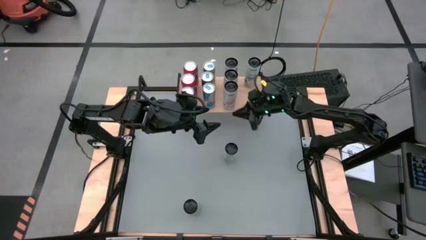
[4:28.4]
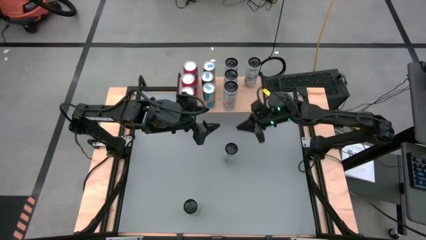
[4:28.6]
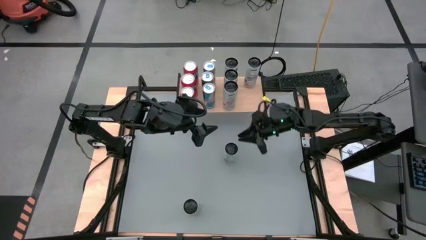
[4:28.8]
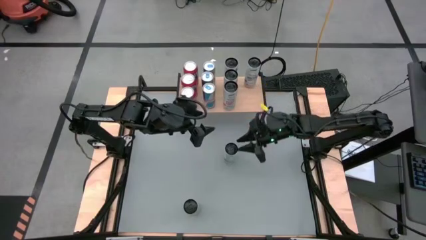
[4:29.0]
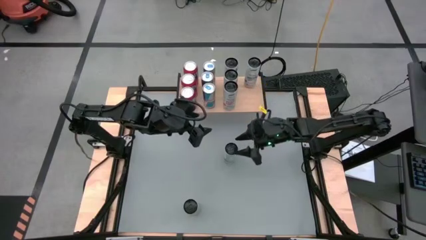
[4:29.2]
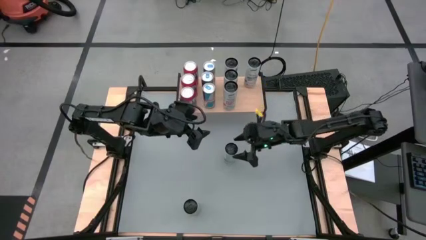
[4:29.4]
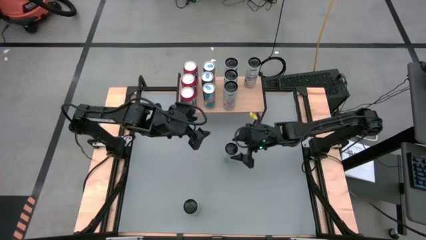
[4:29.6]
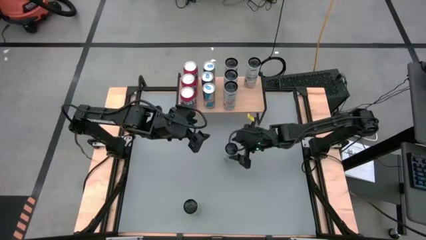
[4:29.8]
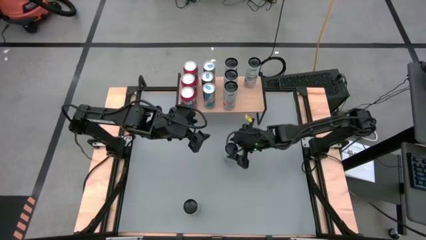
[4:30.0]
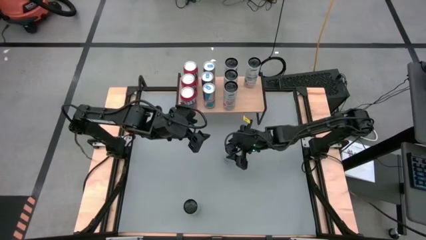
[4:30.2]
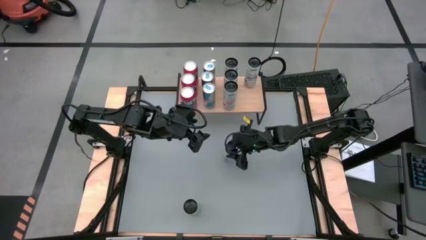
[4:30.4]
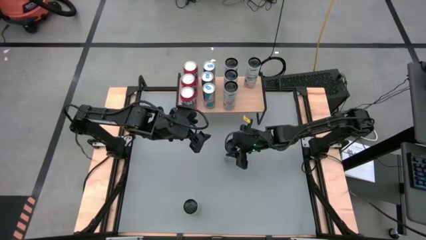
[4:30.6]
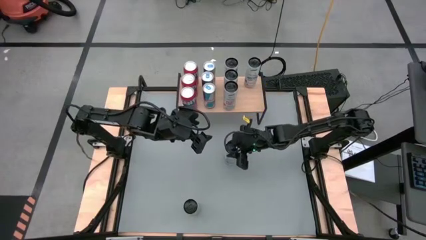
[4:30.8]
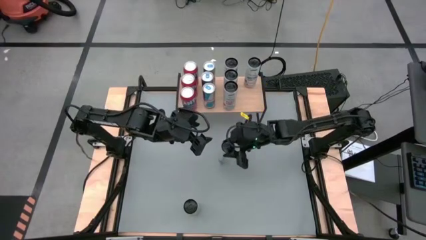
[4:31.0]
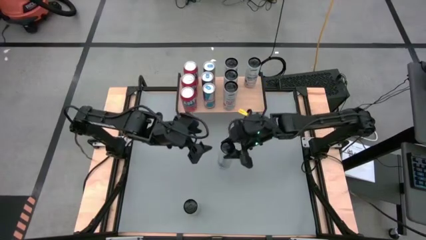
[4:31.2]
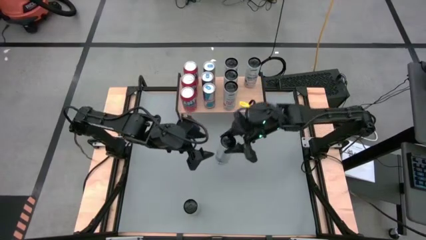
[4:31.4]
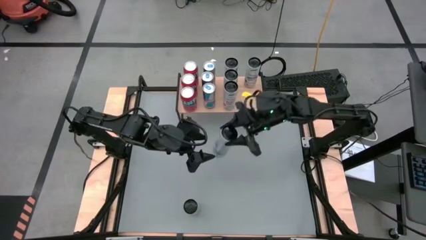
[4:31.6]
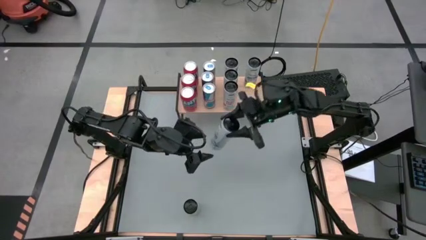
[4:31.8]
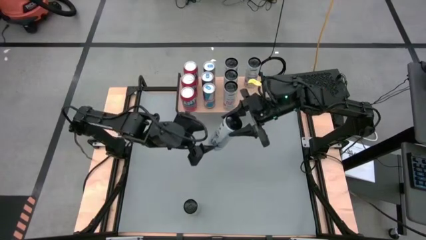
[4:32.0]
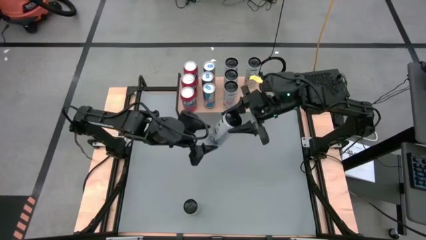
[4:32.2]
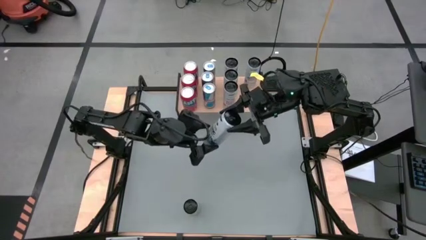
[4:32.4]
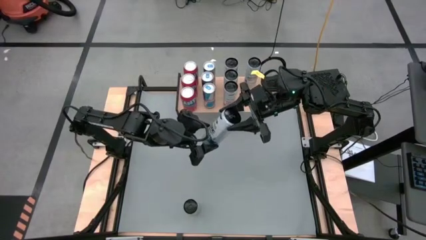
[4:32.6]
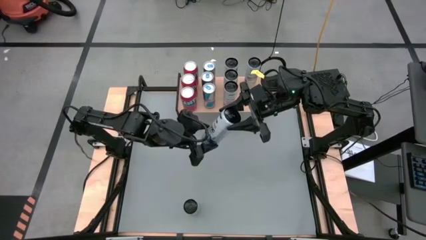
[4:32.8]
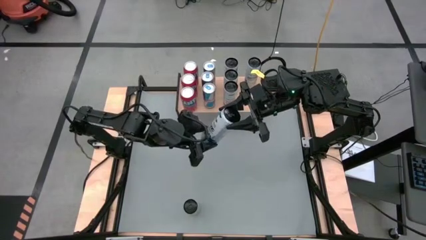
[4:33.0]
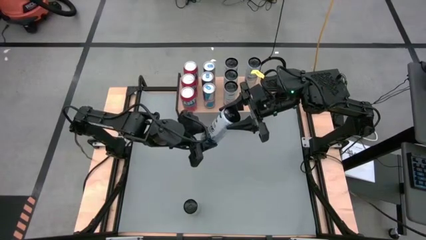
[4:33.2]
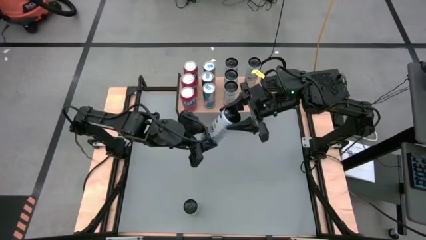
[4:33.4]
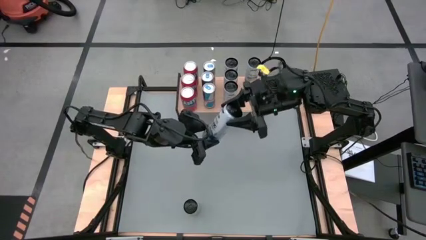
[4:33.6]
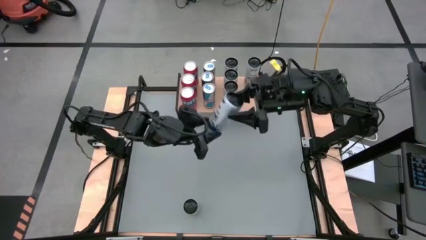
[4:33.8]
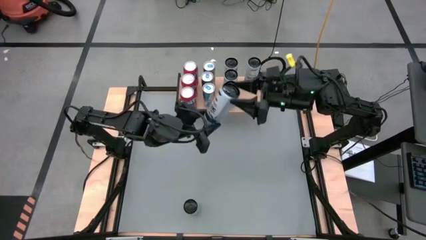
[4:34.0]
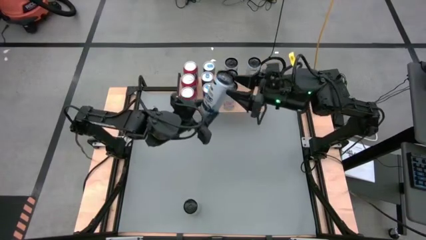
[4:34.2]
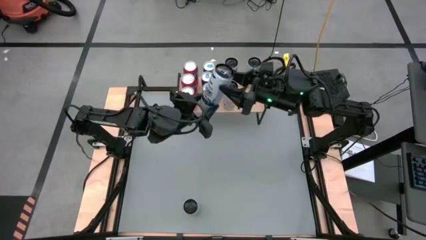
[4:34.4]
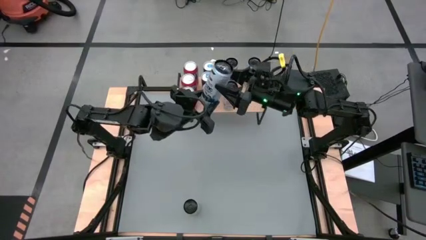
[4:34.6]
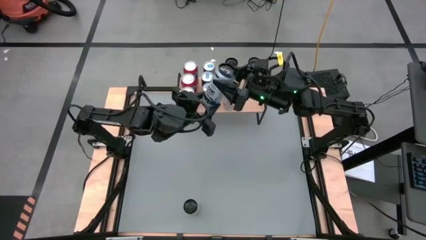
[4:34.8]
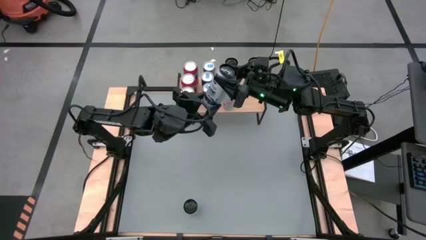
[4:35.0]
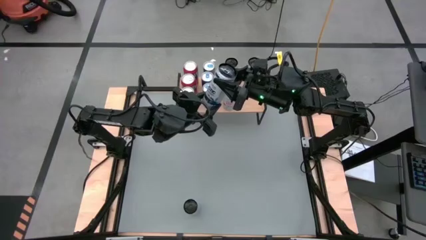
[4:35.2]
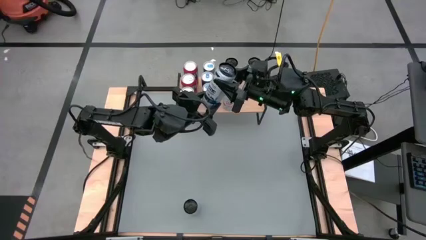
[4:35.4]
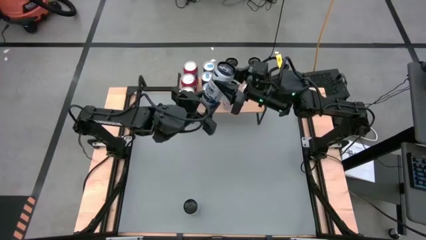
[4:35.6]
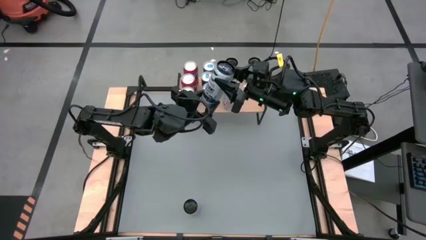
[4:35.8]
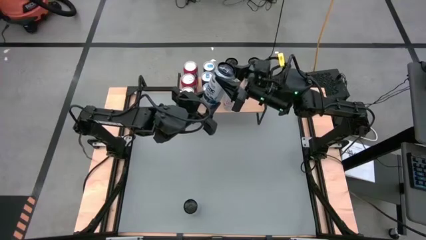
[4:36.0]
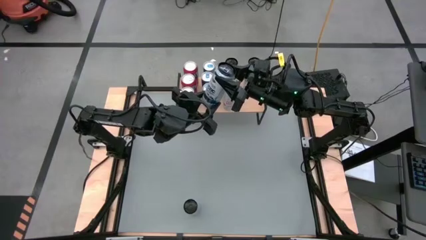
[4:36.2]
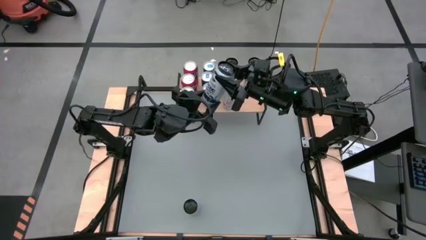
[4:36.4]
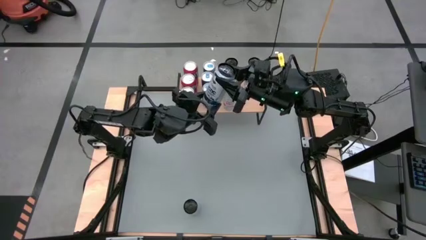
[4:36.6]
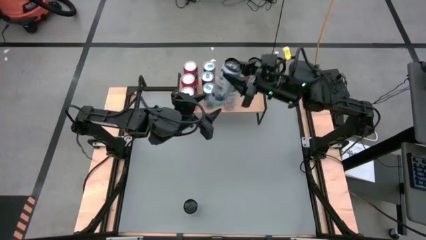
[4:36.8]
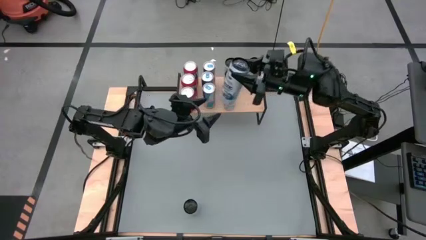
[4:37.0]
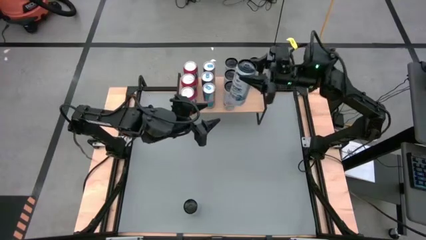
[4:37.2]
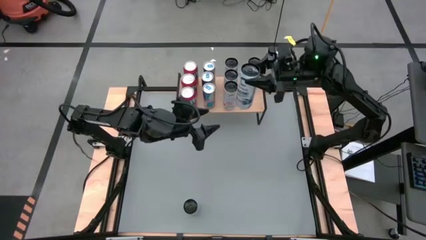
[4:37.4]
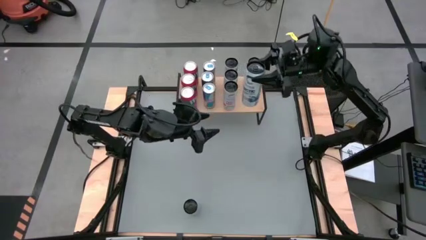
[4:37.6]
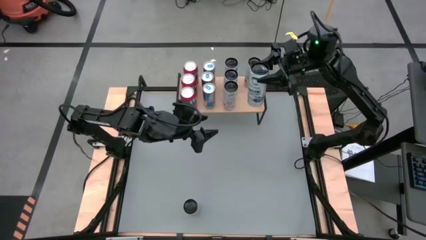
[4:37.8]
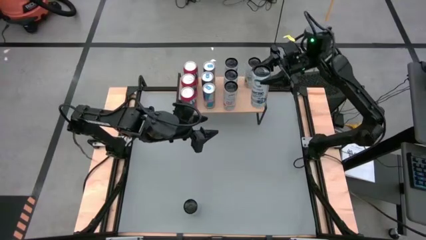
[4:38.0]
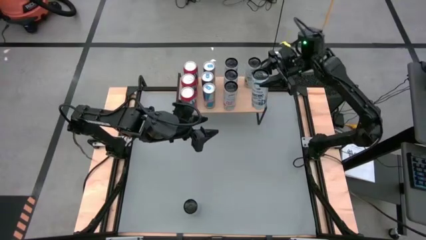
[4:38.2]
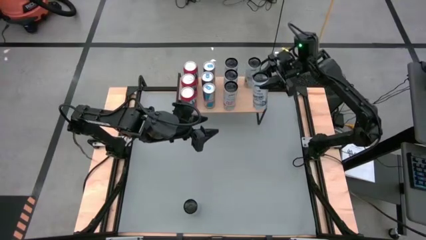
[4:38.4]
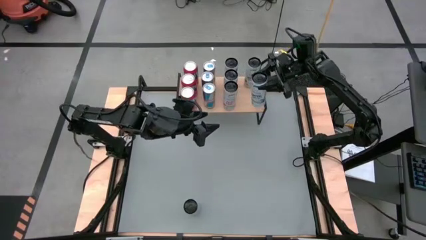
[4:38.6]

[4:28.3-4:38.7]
Task: Place canned beverage on shelf
Put the top white-blue soda can on the shelf aligned with the other white-blue soda can

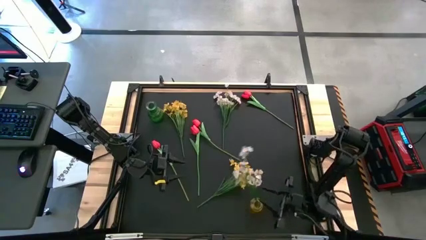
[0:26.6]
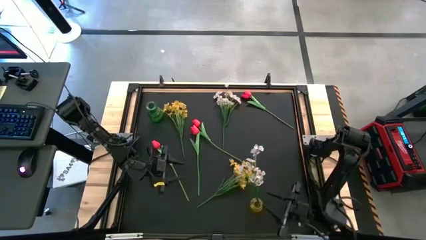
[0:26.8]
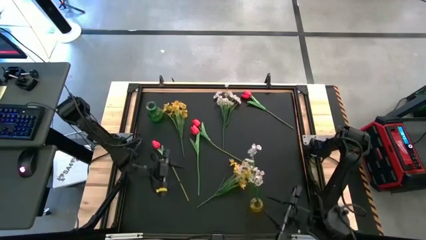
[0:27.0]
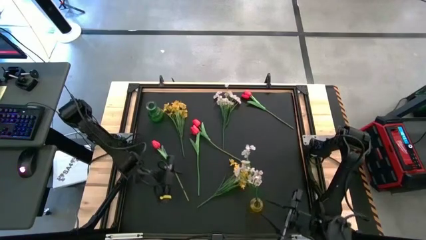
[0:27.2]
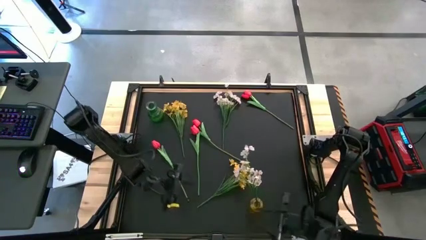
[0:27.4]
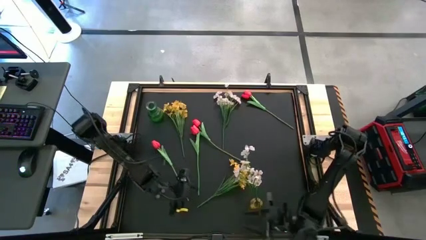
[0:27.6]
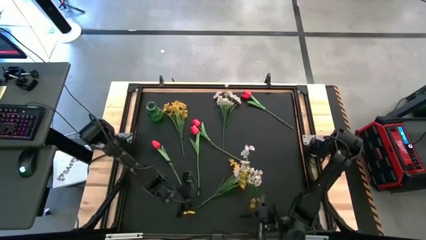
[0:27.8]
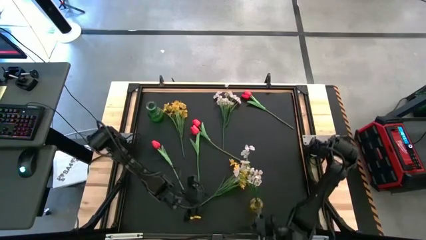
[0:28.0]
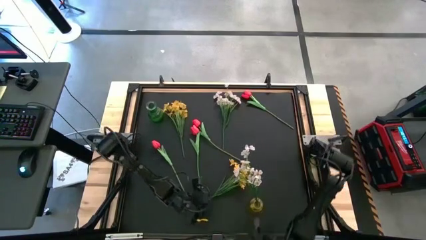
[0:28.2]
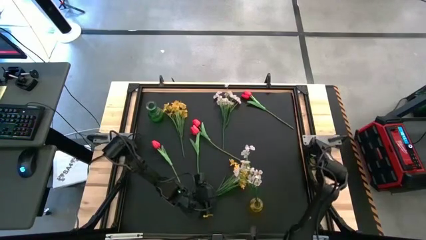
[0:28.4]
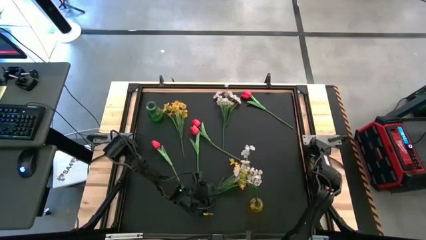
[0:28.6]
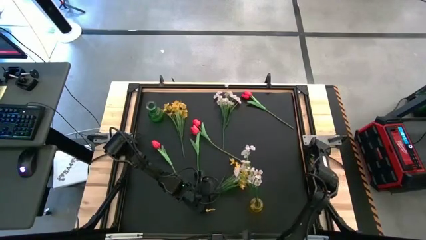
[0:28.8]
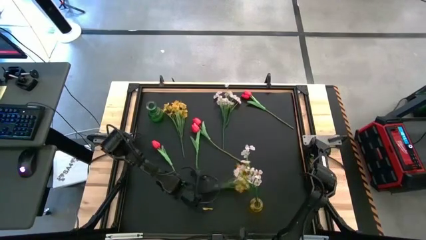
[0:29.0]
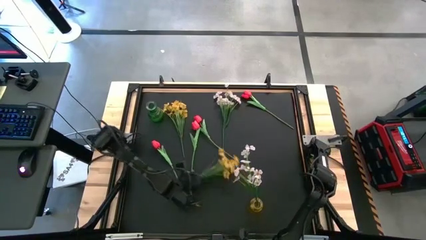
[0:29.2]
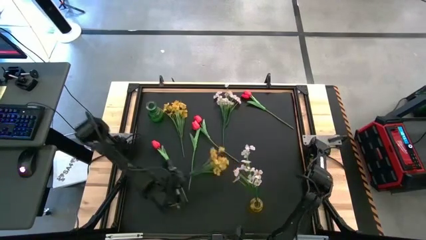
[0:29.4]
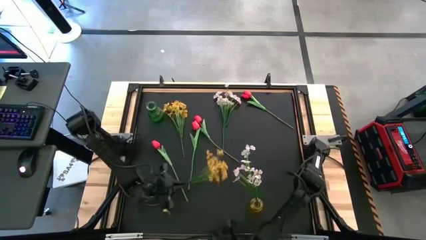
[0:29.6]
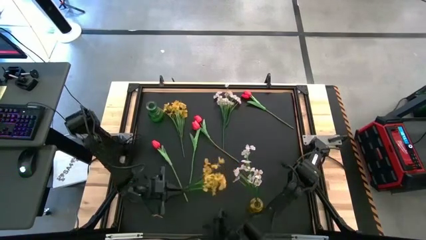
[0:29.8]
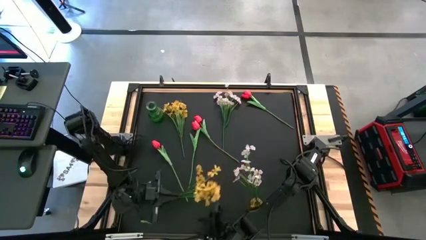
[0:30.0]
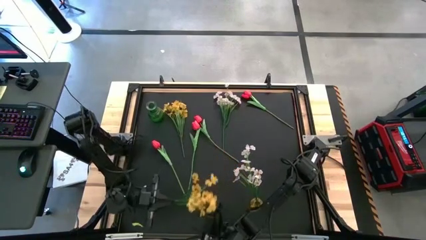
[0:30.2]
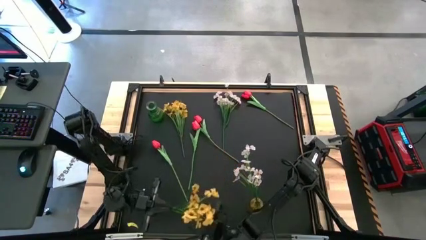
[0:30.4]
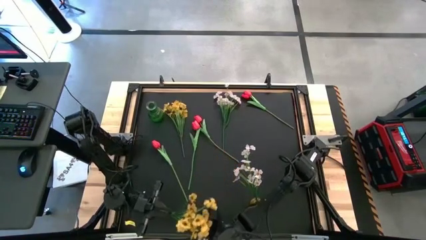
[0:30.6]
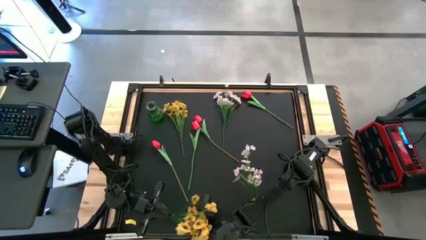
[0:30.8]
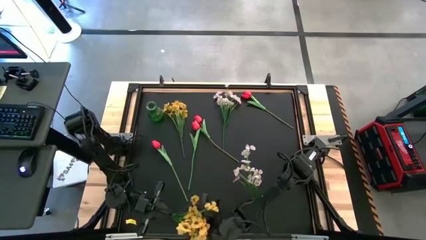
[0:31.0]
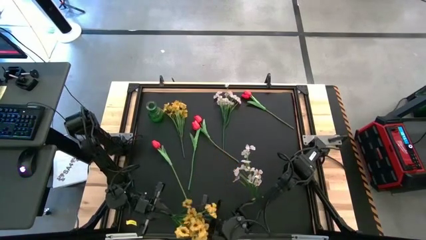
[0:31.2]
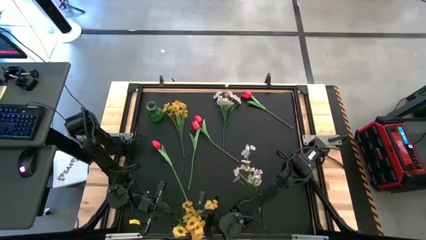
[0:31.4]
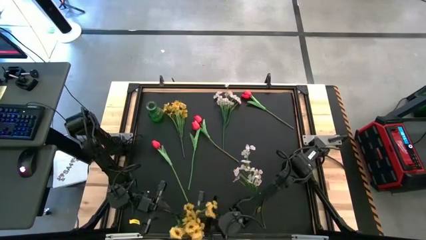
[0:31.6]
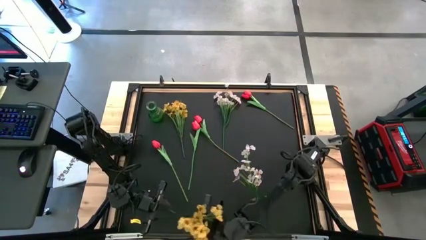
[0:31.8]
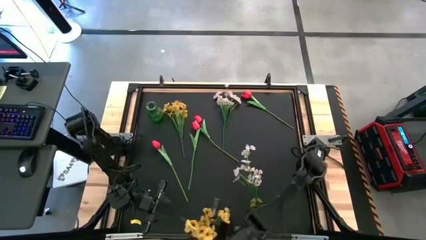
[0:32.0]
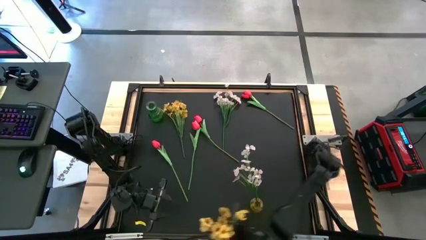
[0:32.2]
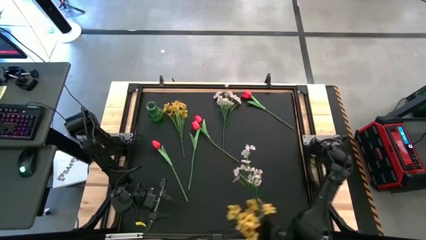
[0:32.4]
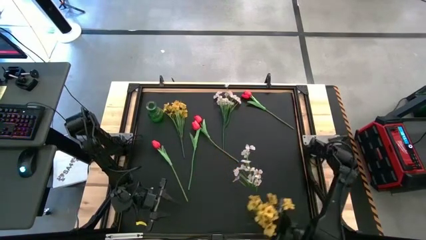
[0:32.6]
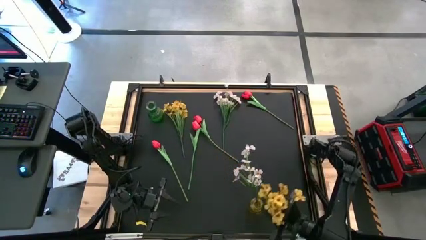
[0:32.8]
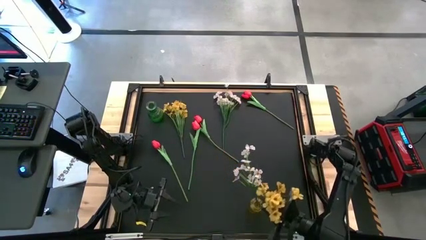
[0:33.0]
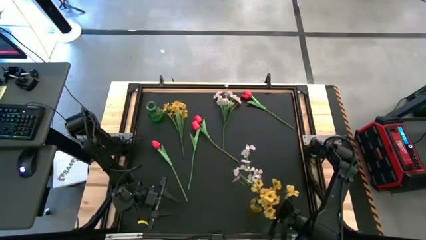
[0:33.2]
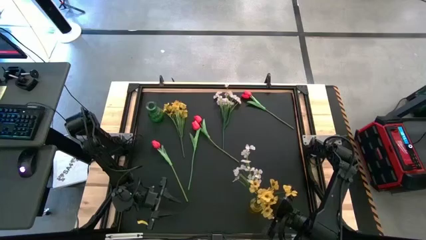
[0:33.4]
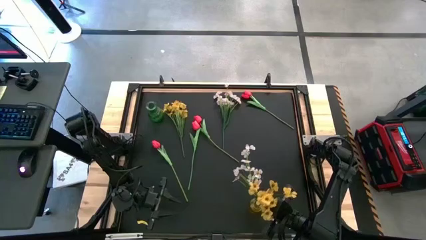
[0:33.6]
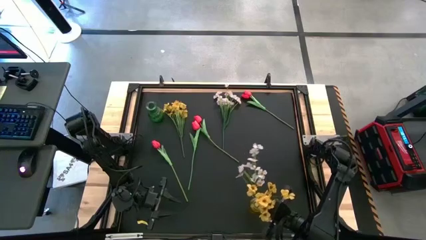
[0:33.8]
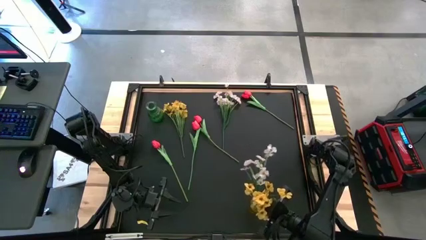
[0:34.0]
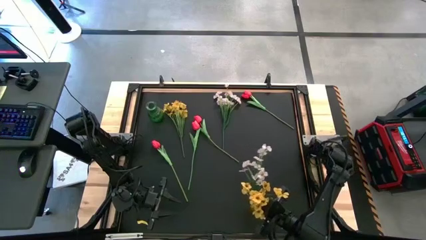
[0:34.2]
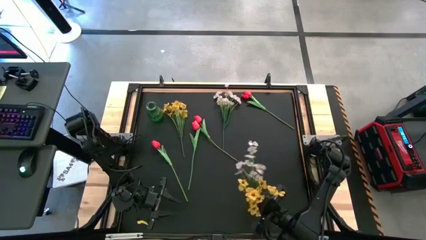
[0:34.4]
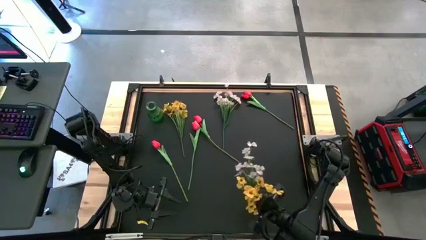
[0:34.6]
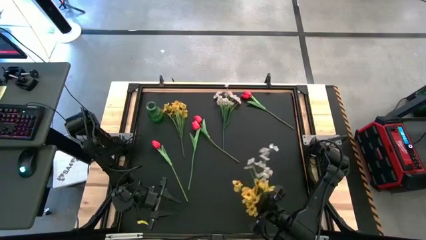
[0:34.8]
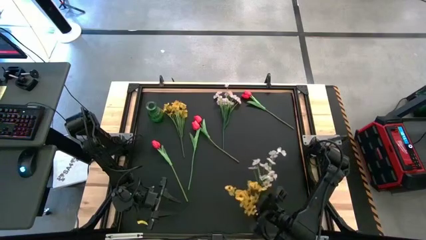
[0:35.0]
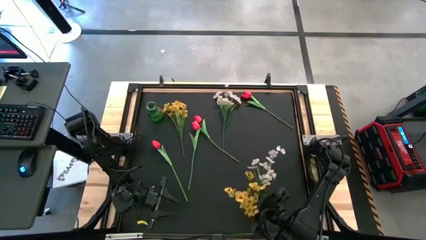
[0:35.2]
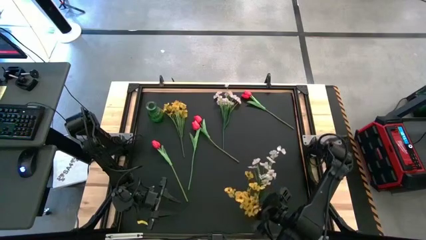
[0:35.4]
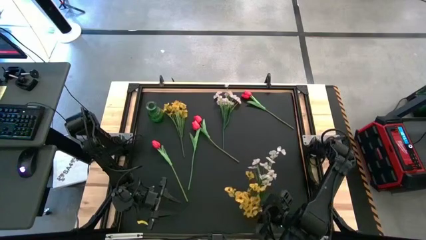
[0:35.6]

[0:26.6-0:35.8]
Task: Sort flowers into vase by color
Put the yellow flower into the yellow vase
